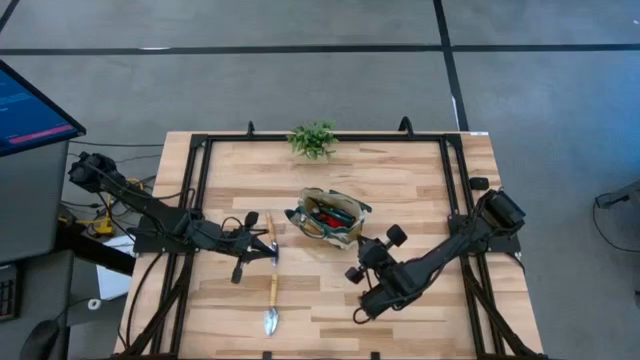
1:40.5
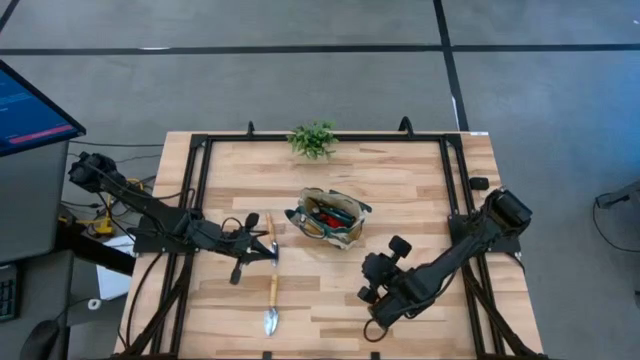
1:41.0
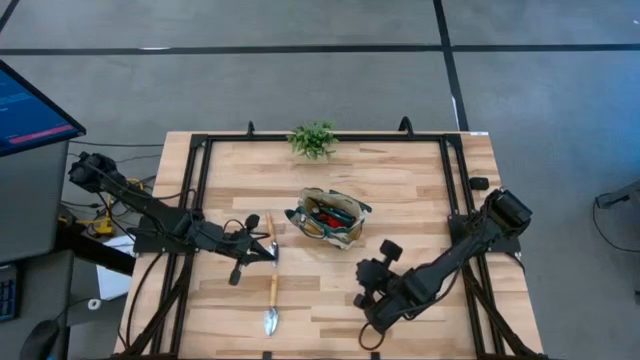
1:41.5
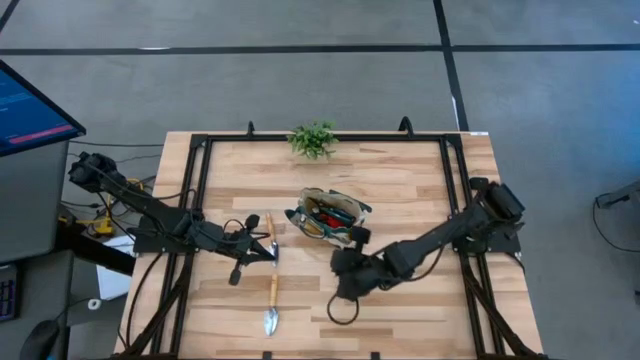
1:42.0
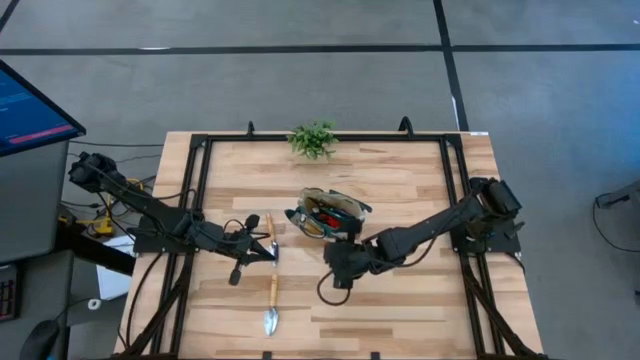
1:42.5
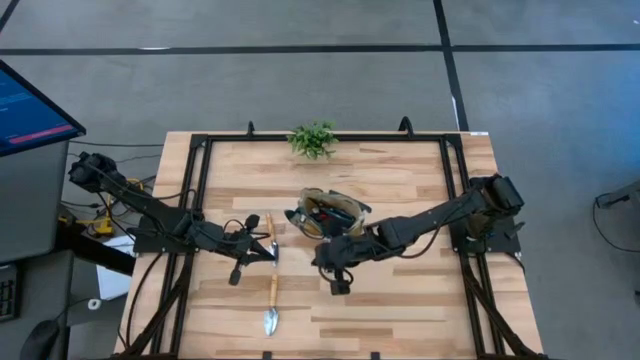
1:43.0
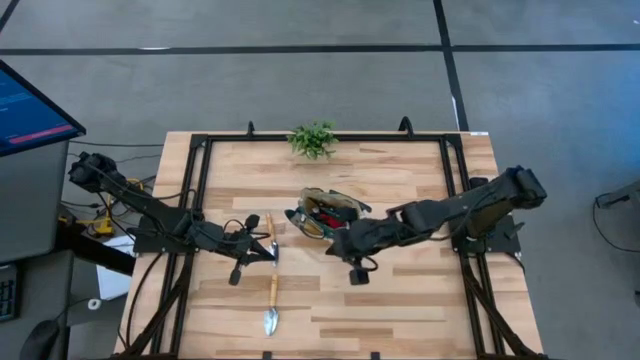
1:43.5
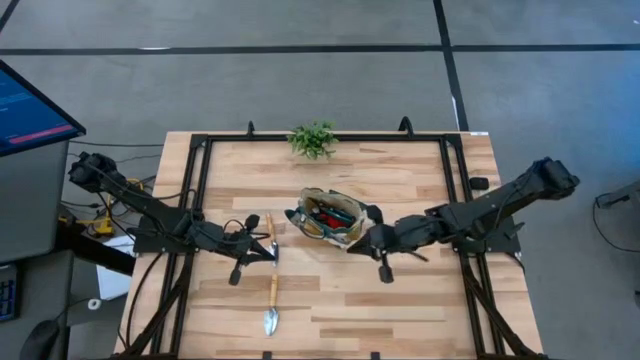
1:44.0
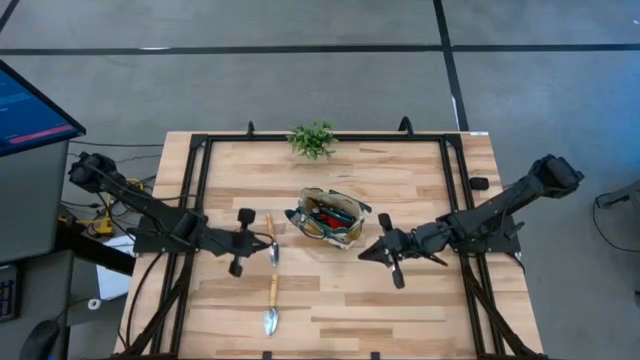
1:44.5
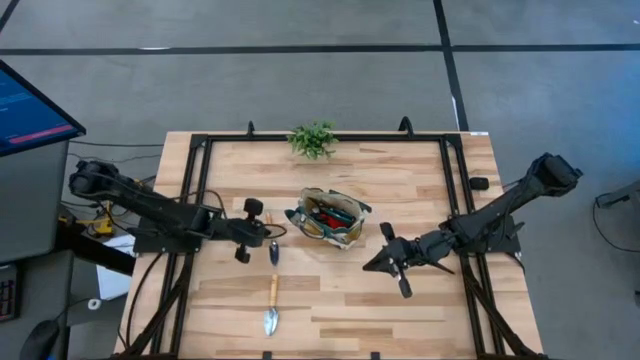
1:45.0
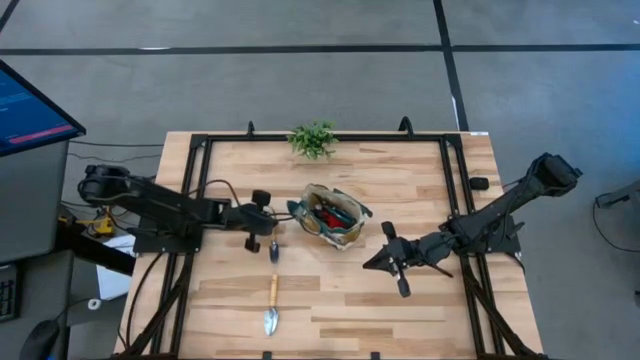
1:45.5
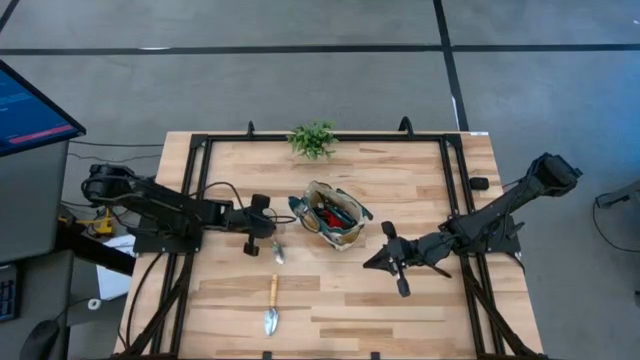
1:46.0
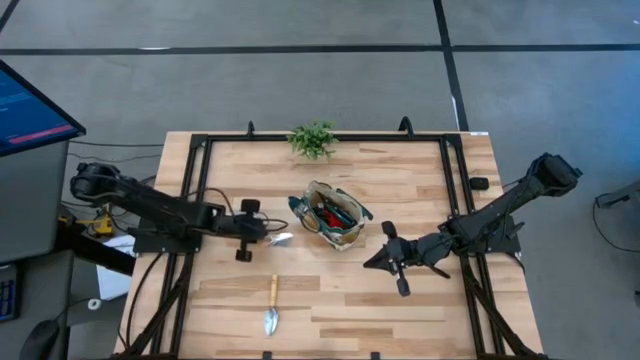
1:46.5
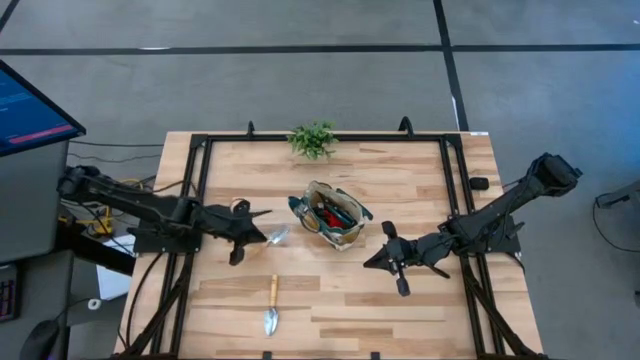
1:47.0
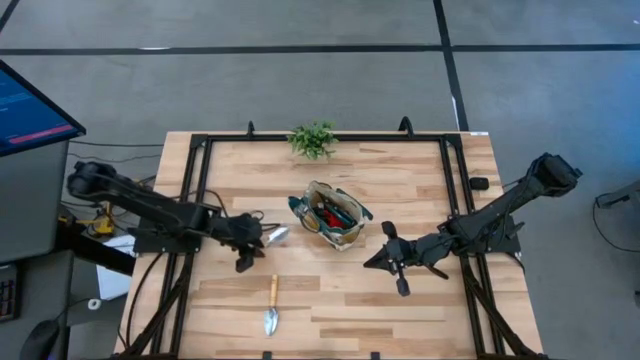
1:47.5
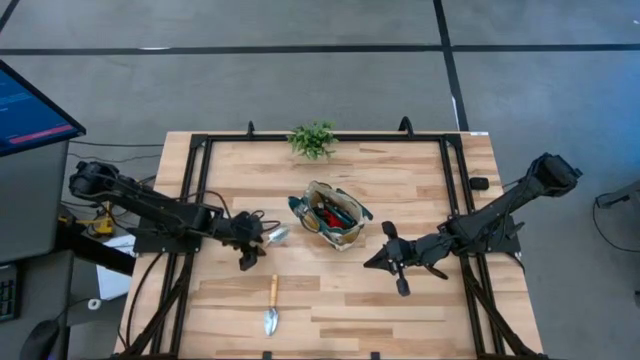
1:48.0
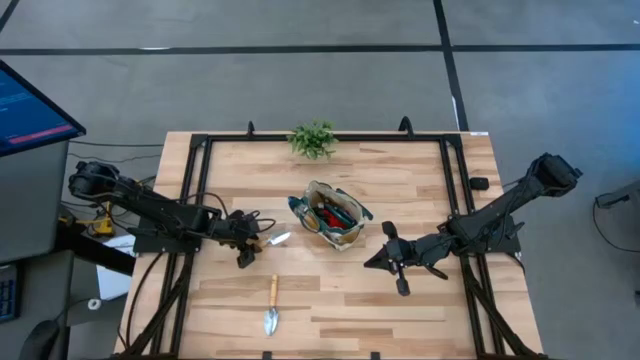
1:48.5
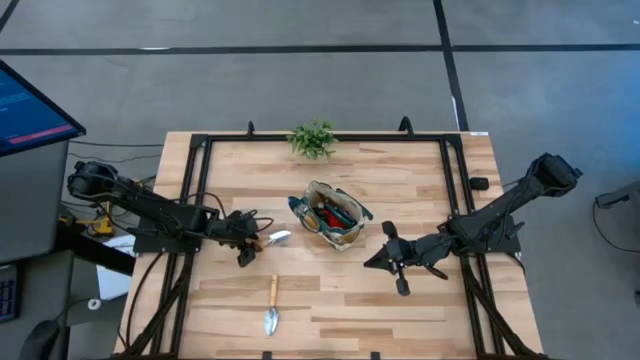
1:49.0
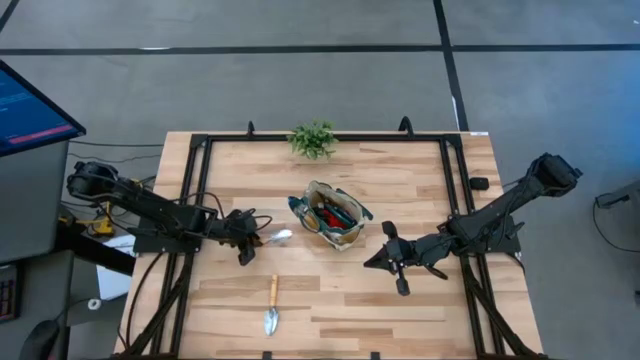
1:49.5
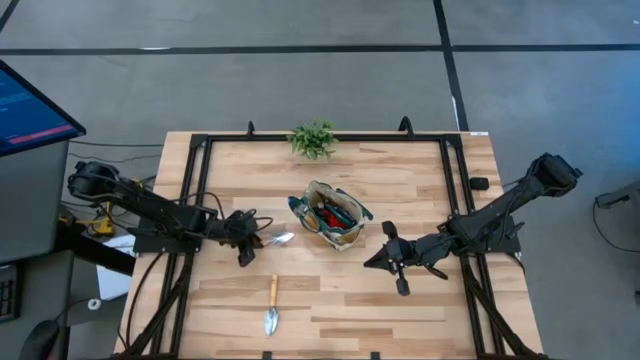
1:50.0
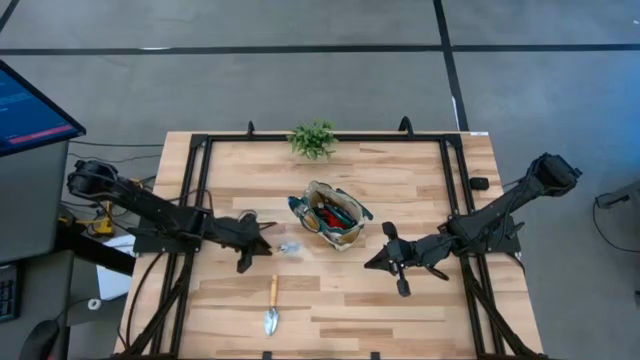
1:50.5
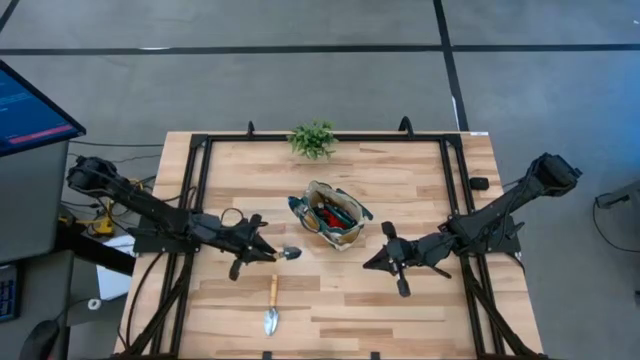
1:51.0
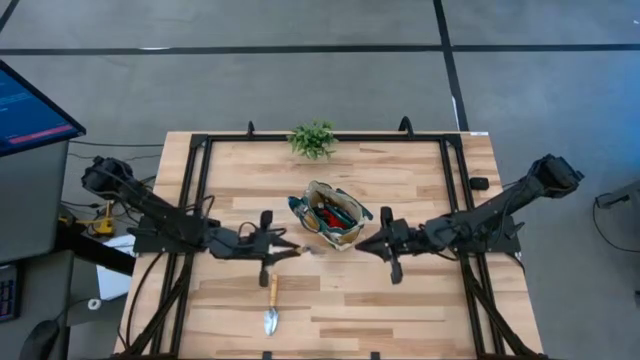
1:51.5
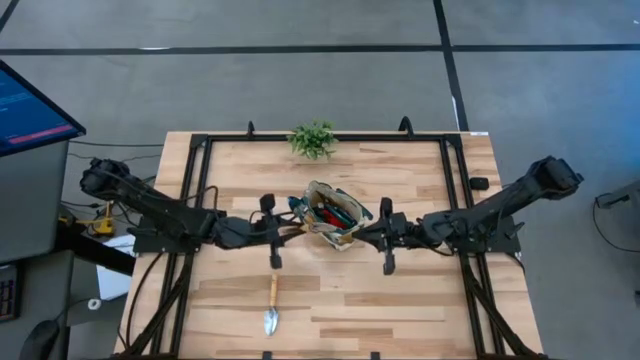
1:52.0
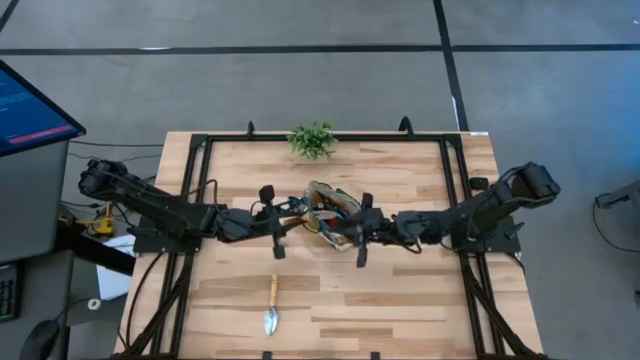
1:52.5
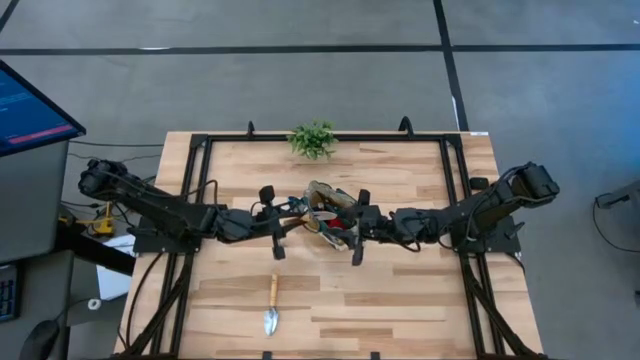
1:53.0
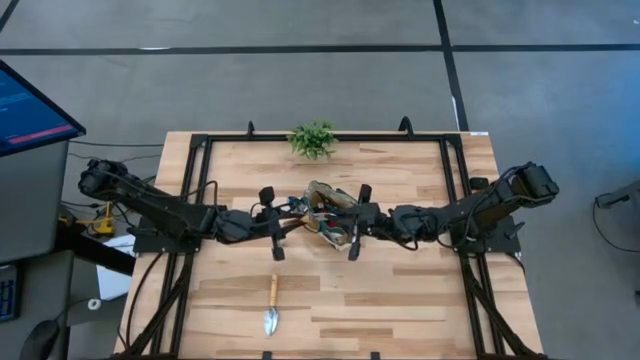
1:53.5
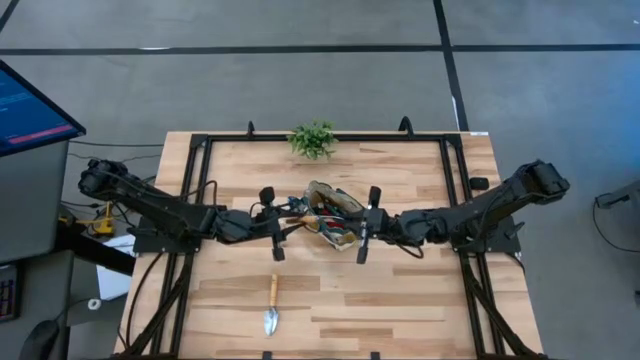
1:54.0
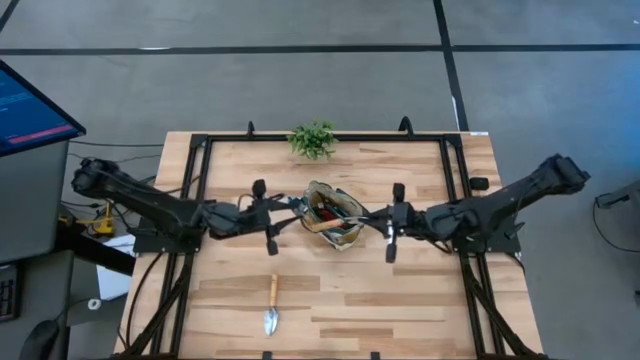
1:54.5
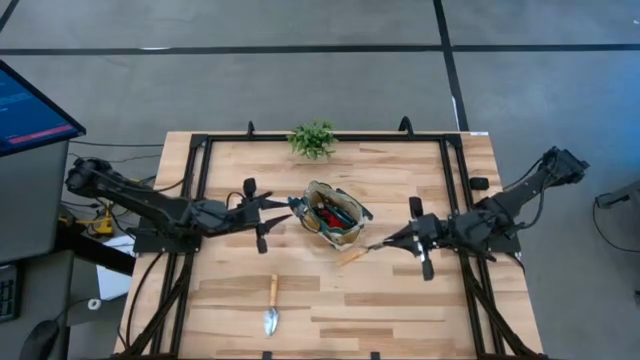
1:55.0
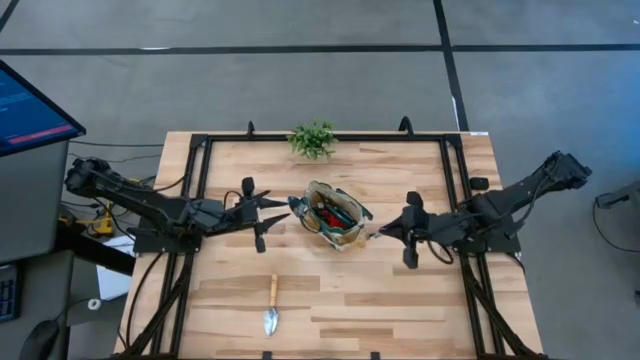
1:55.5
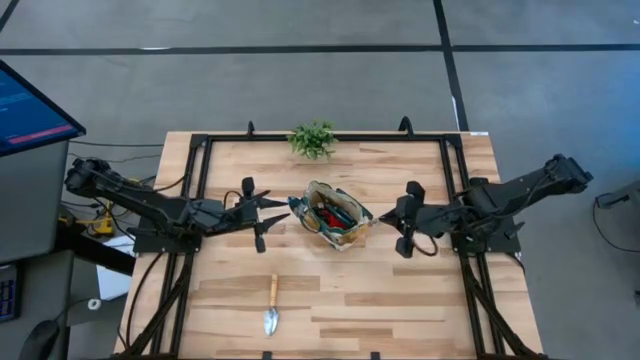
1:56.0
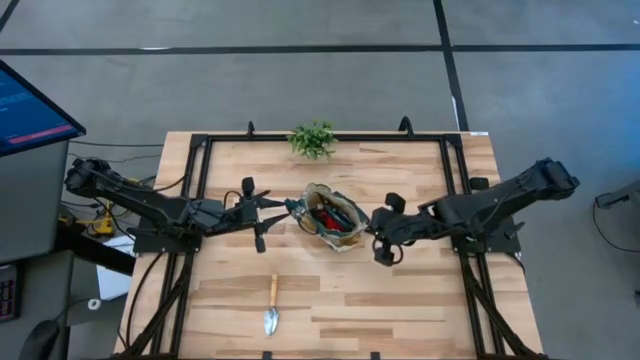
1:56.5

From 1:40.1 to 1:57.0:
Task: Pick & Place Garden tools in Gardening bag
Put the top trowel into the gardening bag

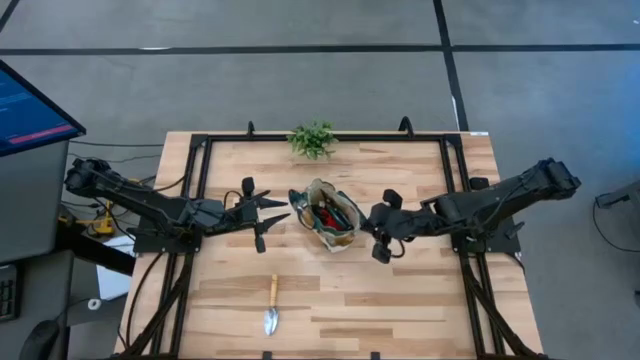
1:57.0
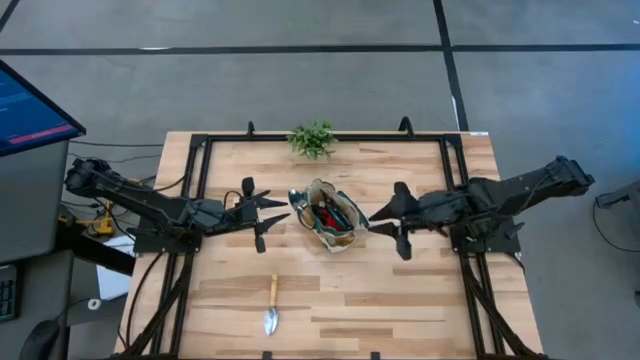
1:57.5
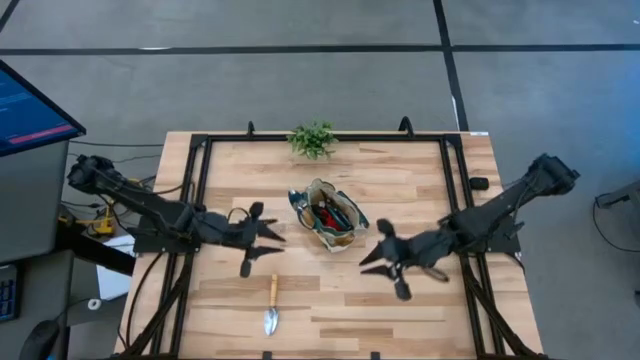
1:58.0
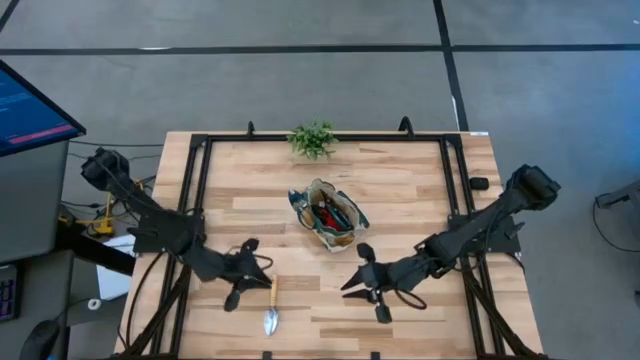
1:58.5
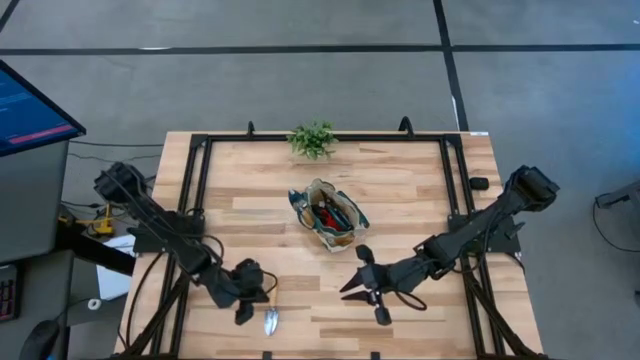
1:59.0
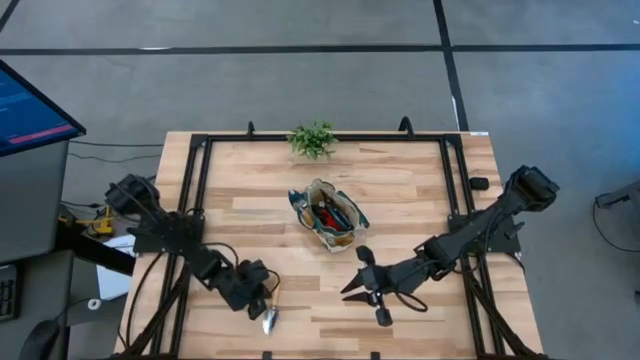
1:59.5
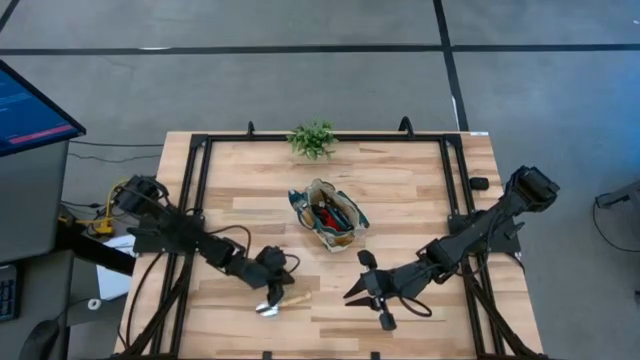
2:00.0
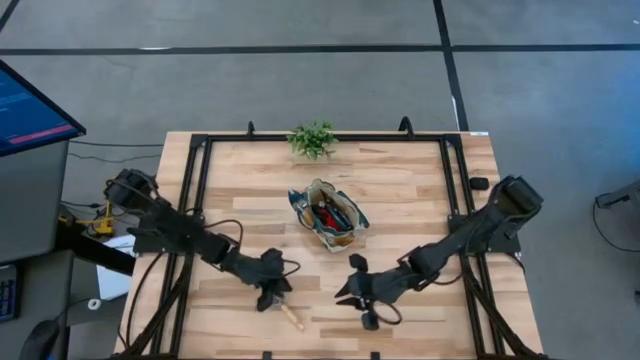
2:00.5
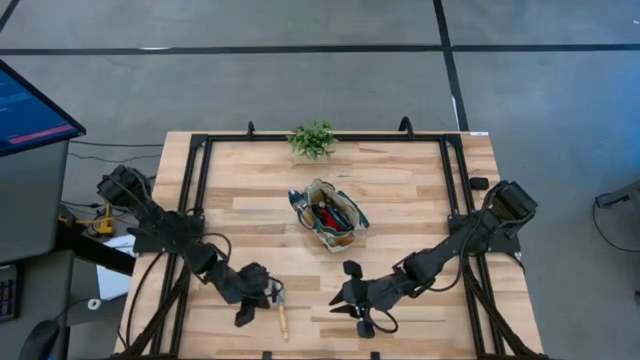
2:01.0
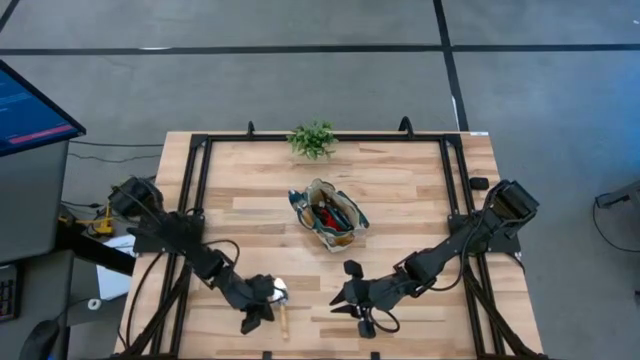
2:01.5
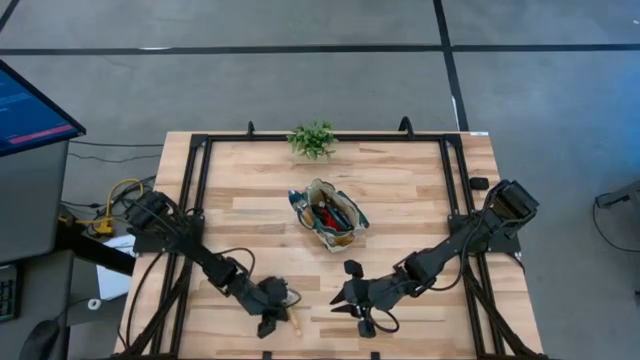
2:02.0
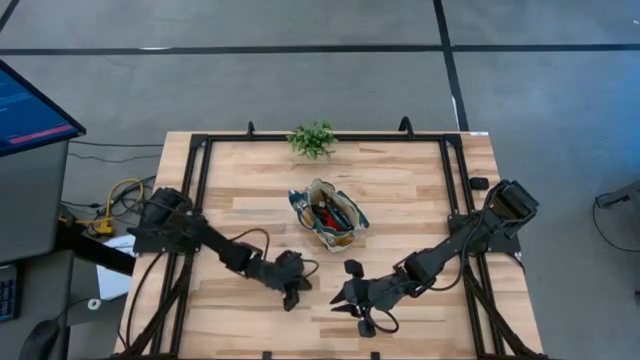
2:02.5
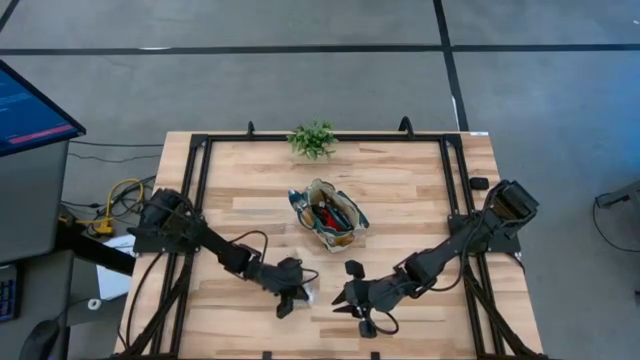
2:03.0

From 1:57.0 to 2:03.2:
Move the trowel
